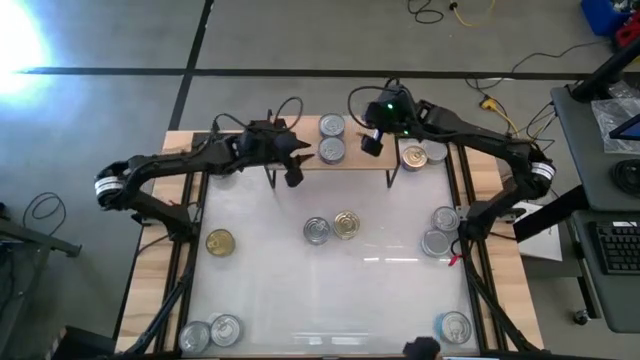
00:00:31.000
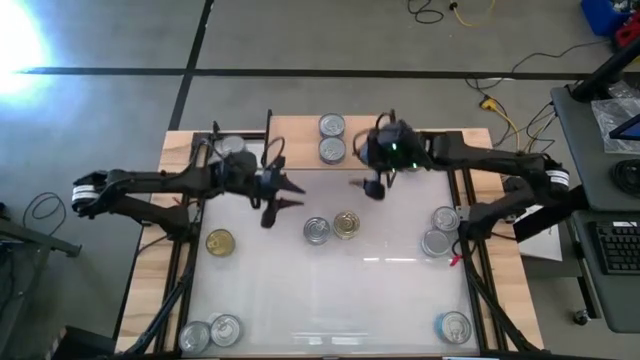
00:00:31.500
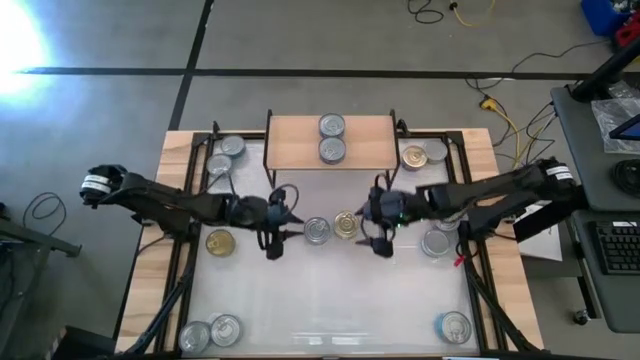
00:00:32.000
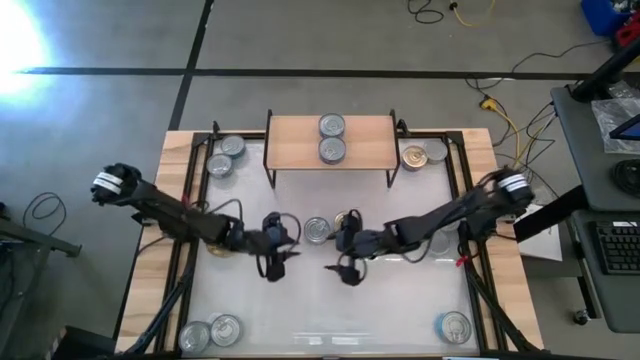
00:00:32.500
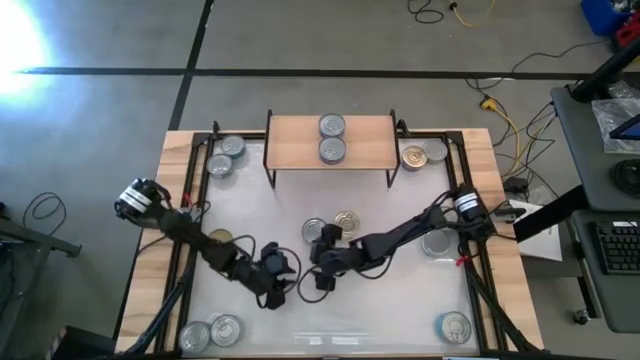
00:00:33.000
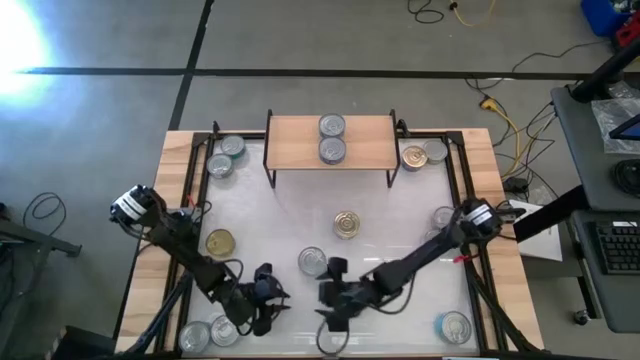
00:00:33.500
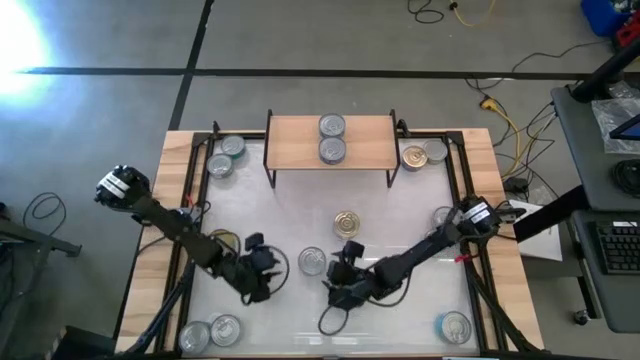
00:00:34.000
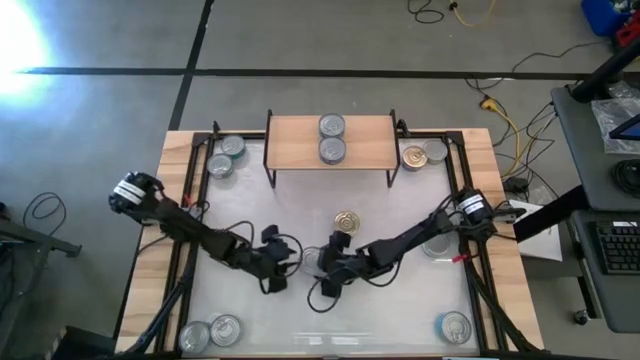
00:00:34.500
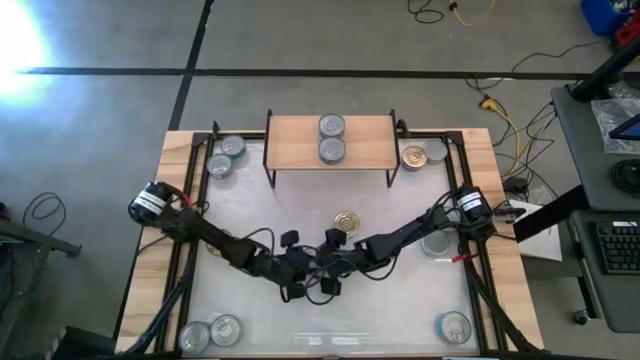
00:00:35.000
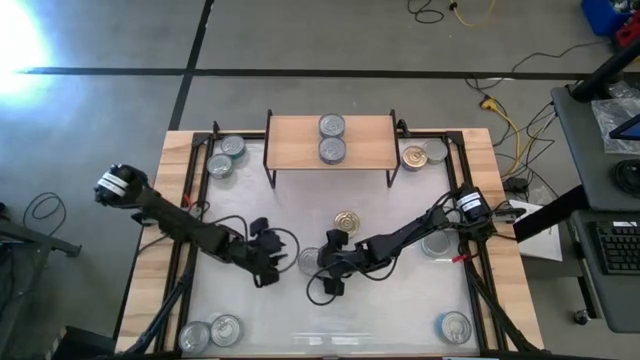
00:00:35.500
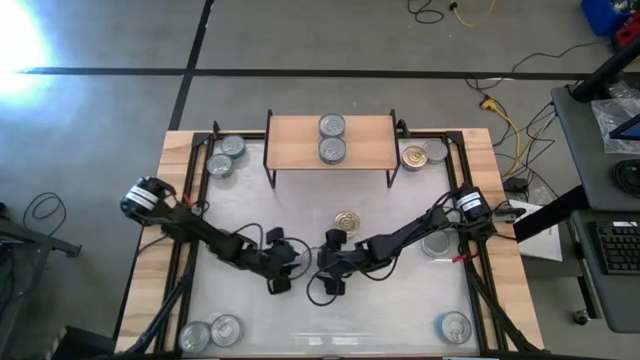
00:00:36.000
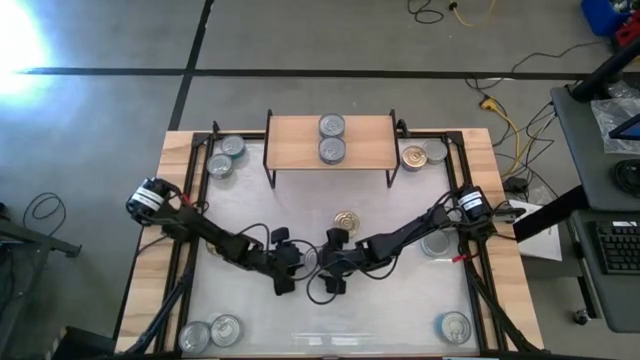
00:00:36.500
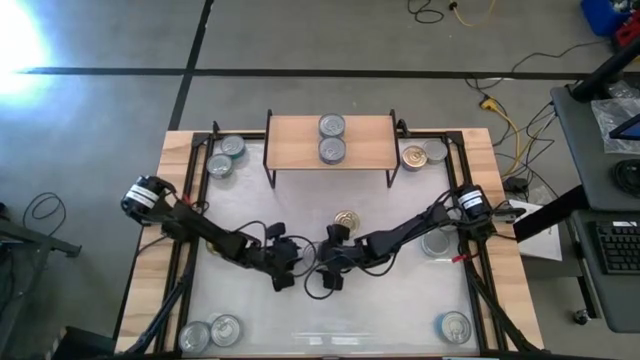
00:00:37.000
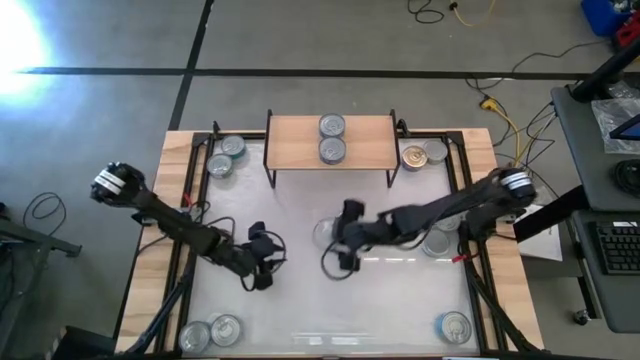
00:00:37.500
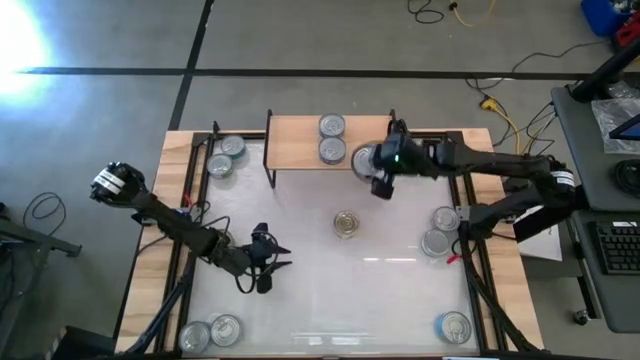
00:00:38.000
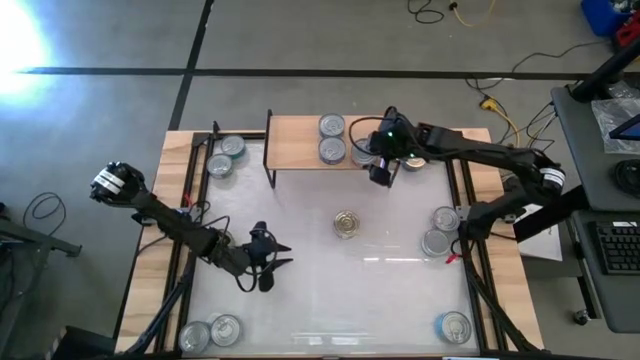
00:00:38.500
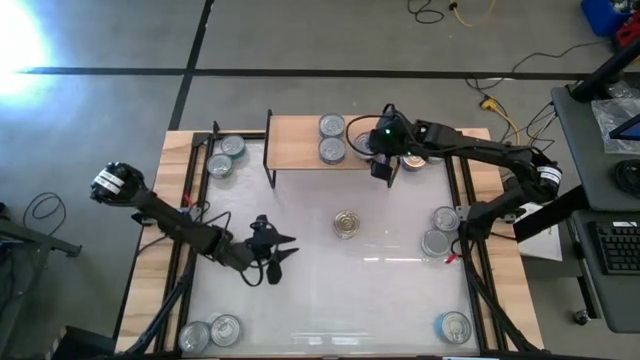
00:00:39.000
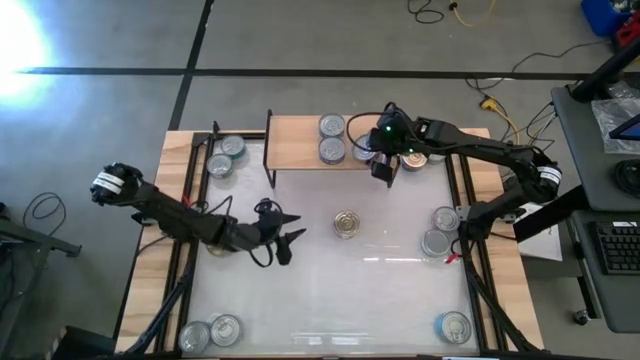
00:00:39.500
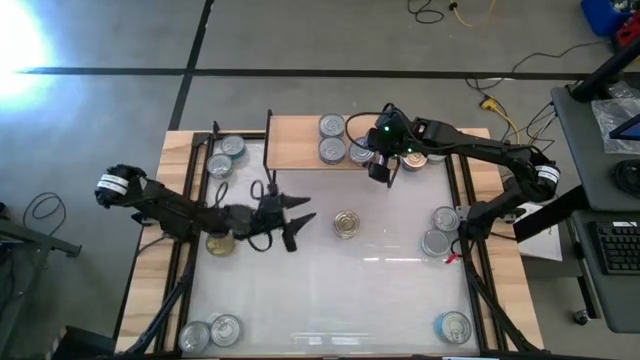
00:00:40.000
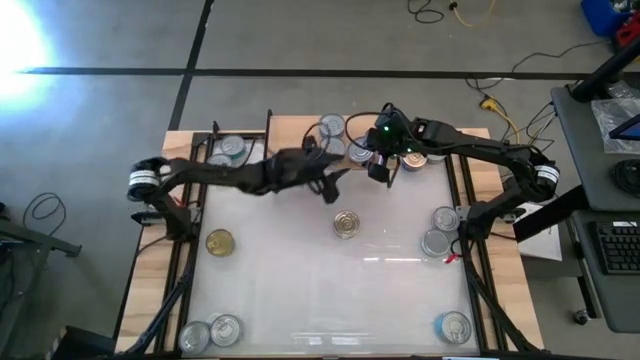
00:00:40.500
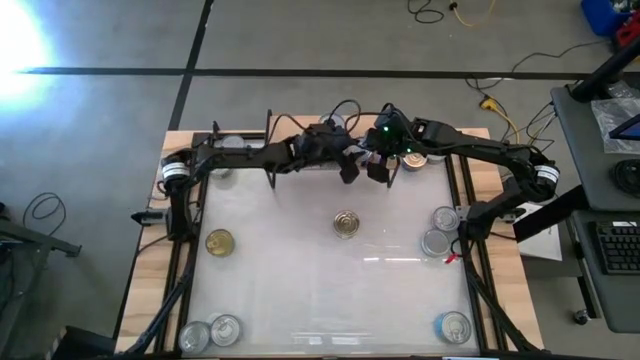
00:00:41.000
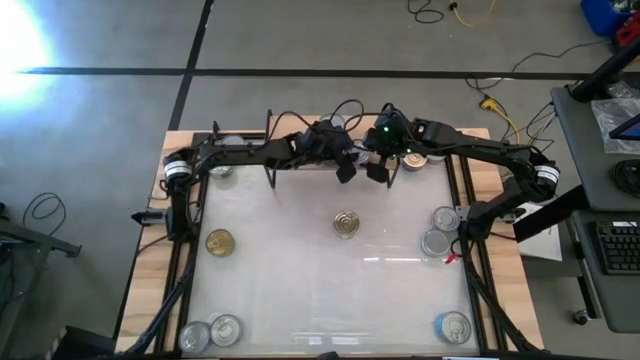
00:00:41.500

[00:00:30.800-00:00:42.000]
Task: Stack canned seafood by type on shelf
Put the left red tuna can on the shelf

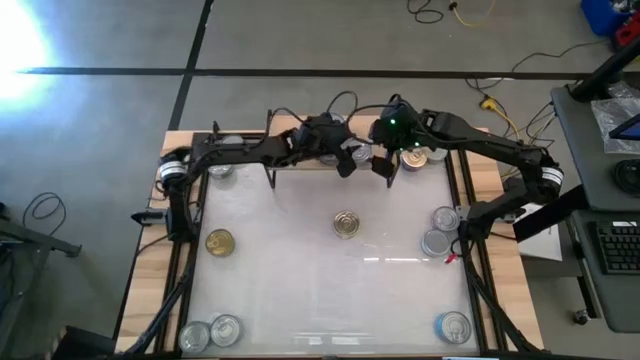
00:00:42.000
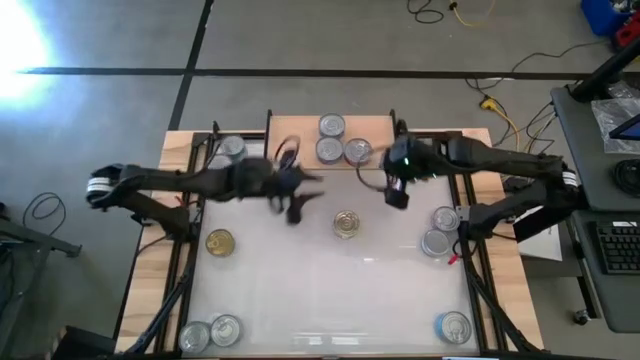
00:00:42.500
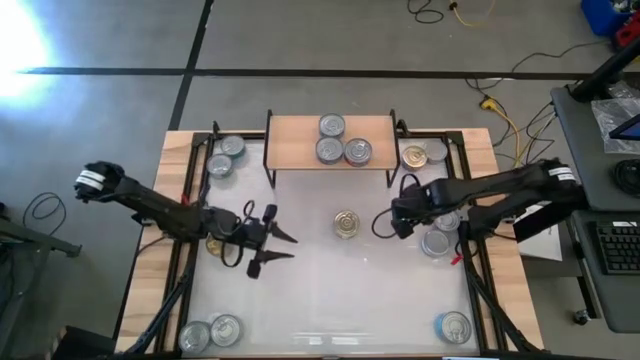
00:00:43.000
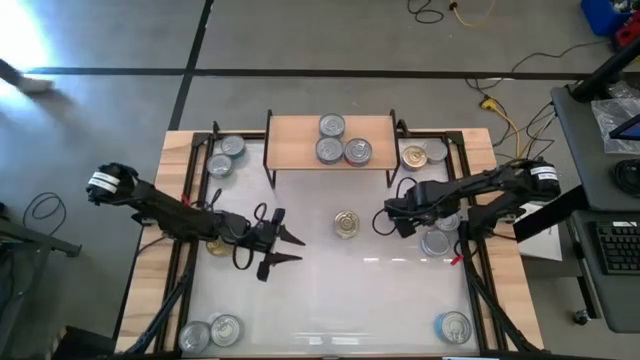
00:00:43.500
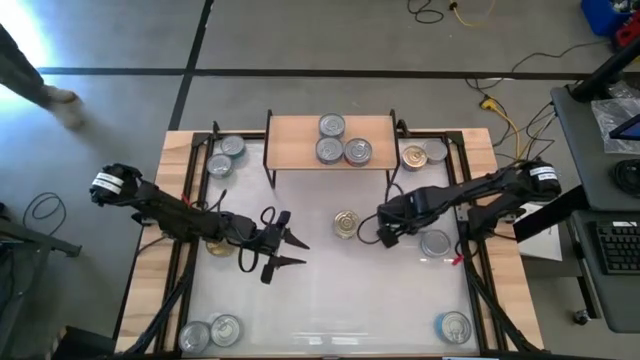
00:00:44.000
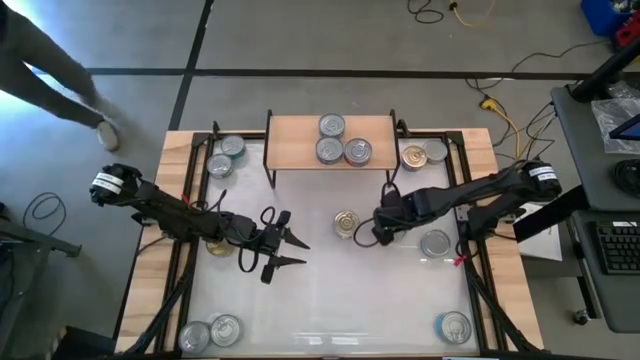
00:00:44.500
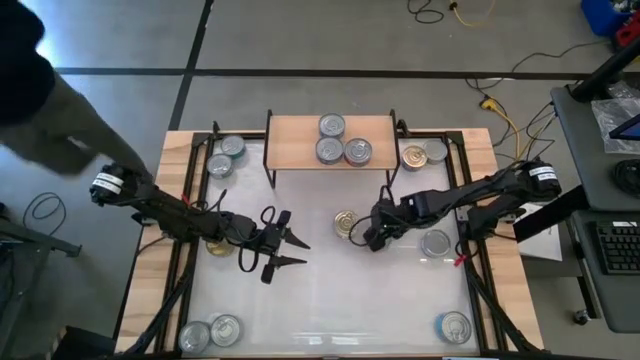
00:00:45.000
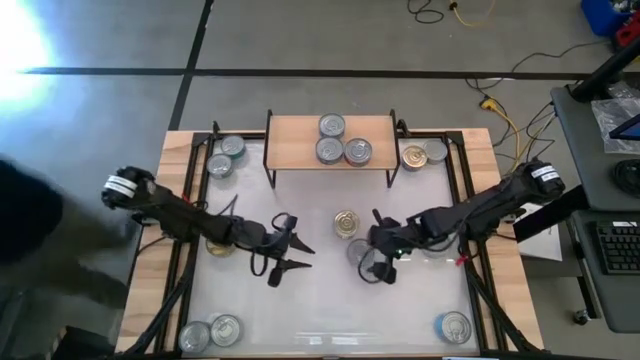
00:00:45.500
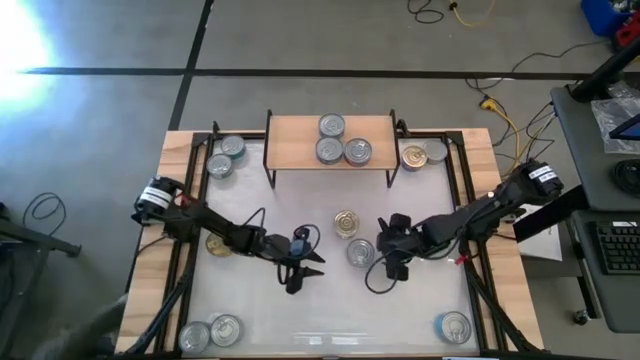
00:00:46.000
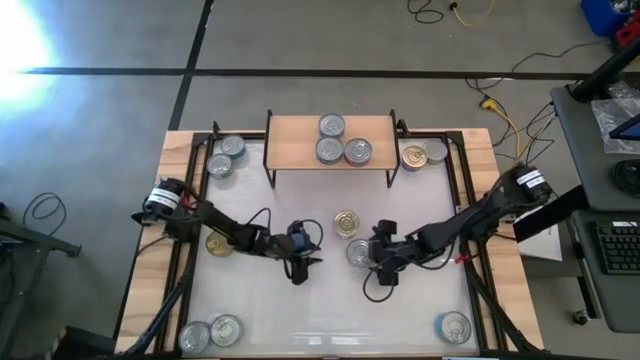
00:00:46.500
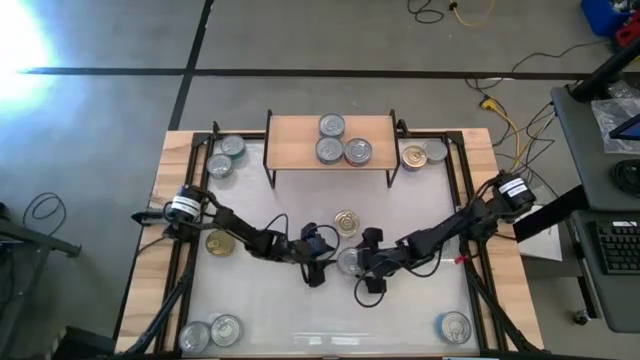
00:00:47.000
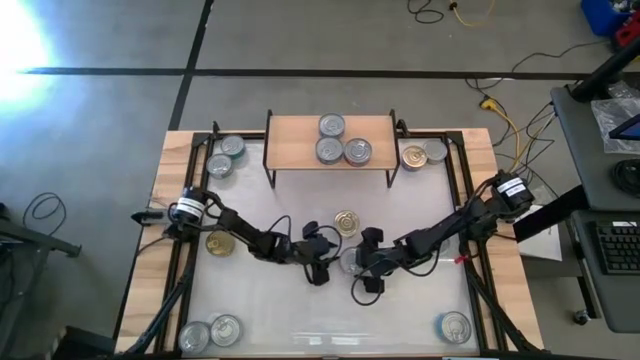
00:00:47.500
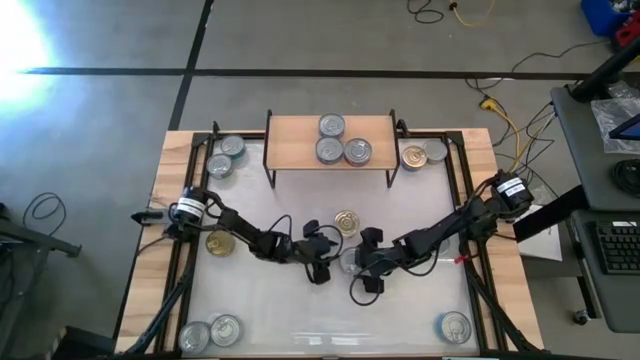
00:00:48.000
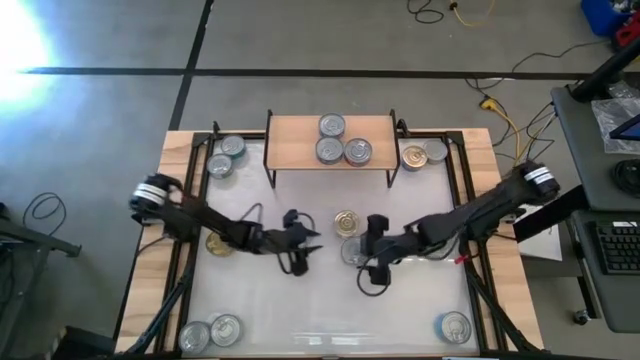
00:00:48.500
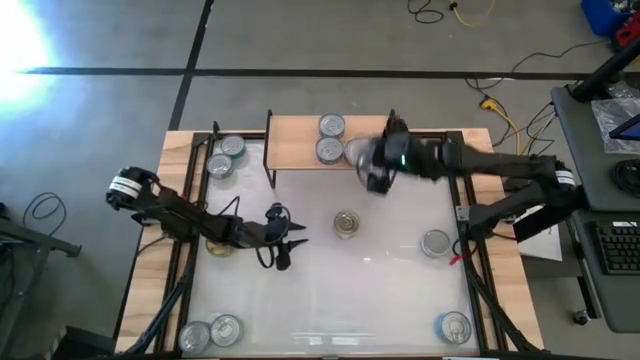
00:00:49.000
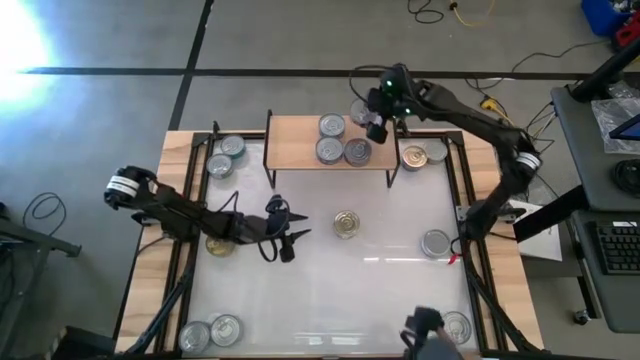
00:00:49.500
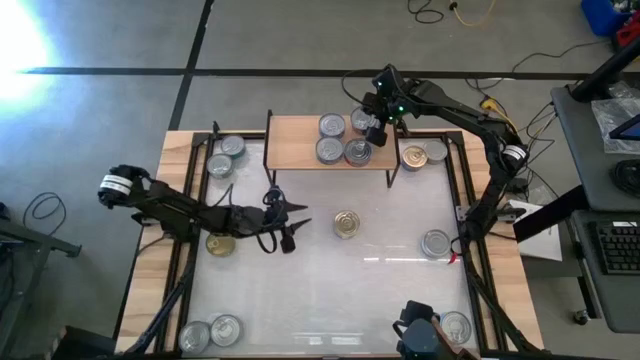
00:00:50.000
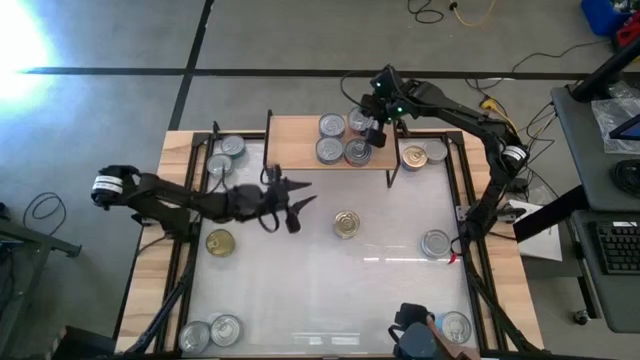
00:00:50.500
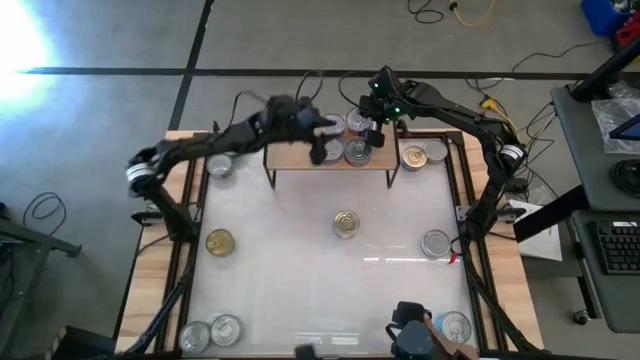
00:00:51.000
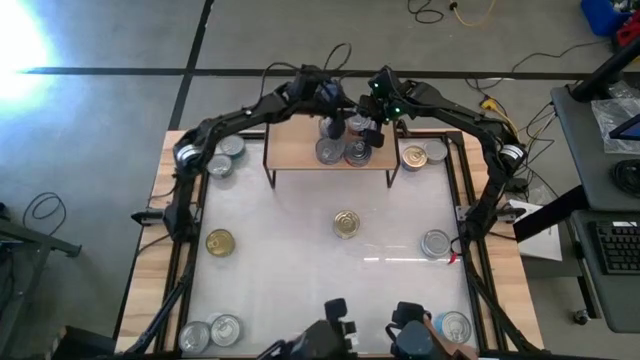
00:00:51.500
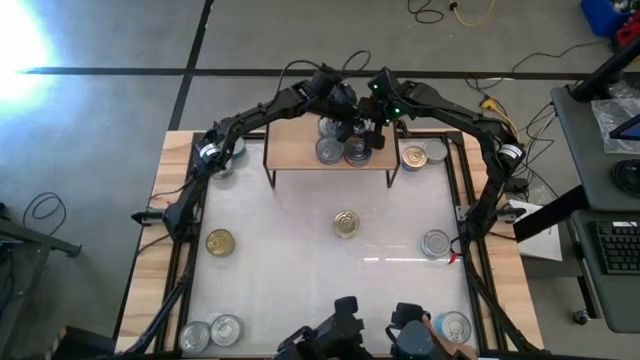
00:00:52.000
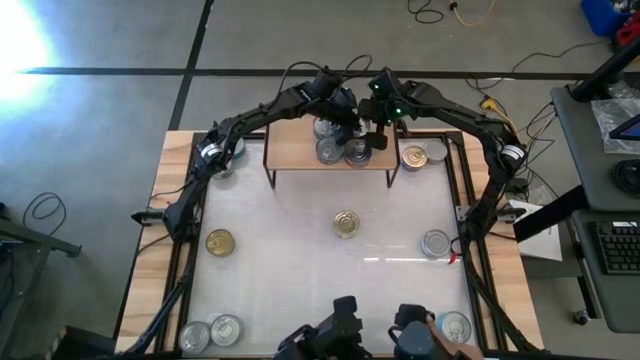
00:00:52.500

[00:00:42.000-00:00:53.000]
Put the red tuna can on the shelf

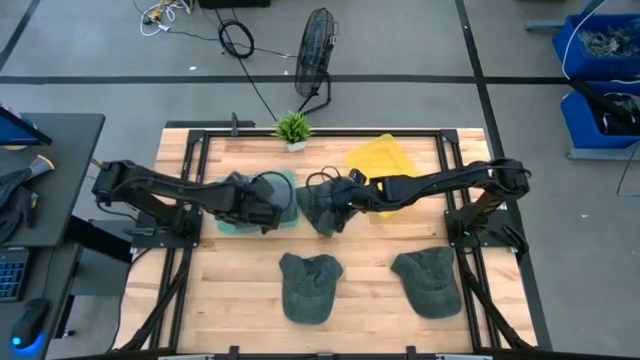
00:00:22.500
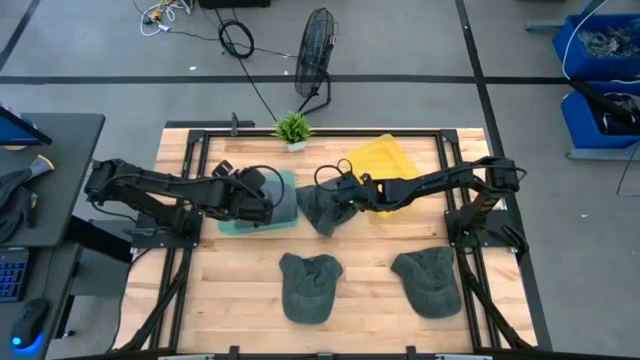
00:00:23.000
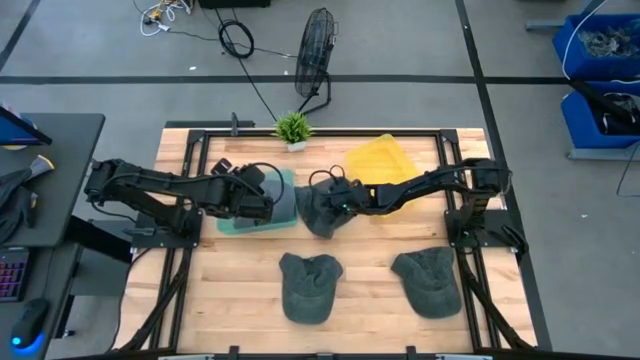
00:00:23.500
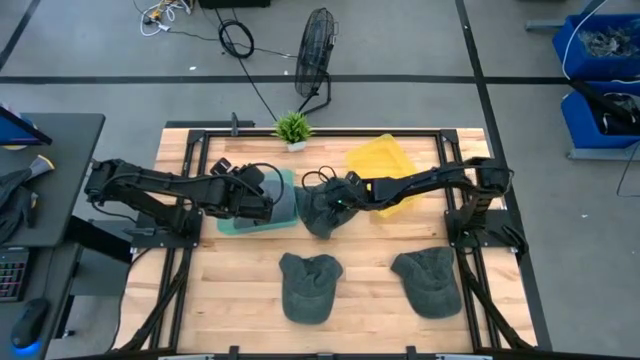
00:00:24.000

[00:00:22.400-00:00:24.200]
Task: Pick & Place hat
Put the top black cap into the yellow bin
